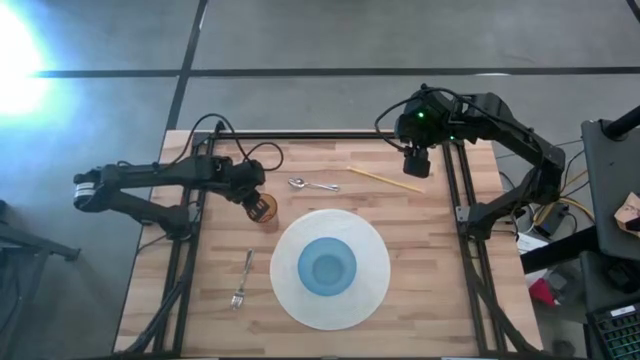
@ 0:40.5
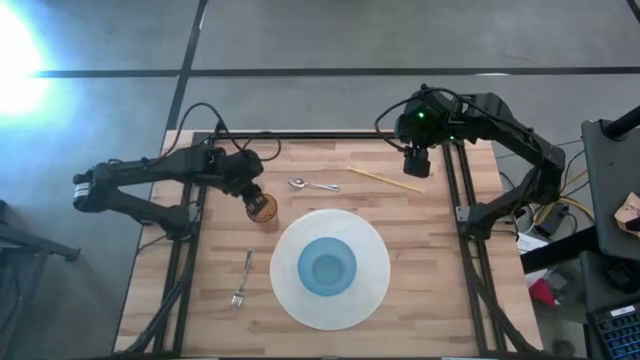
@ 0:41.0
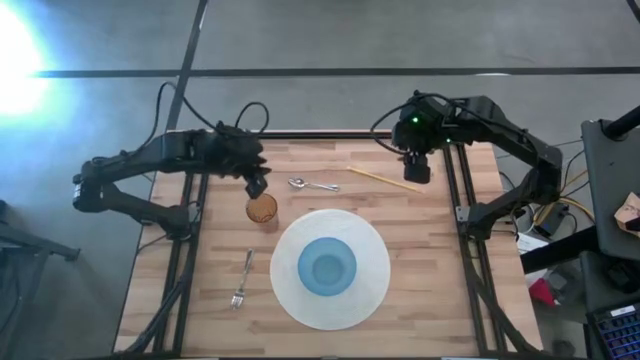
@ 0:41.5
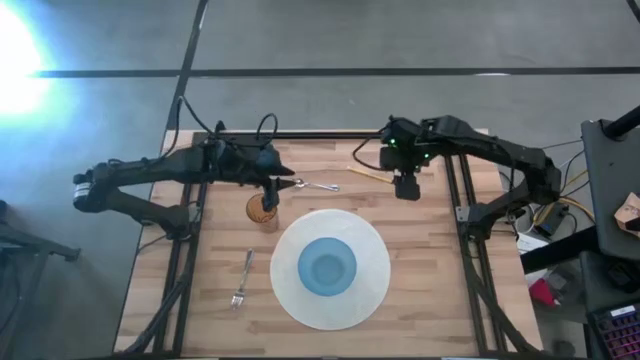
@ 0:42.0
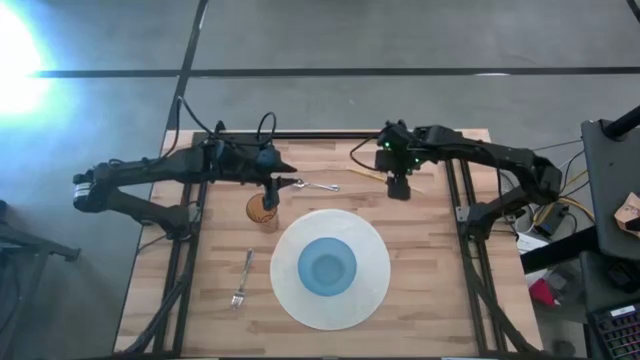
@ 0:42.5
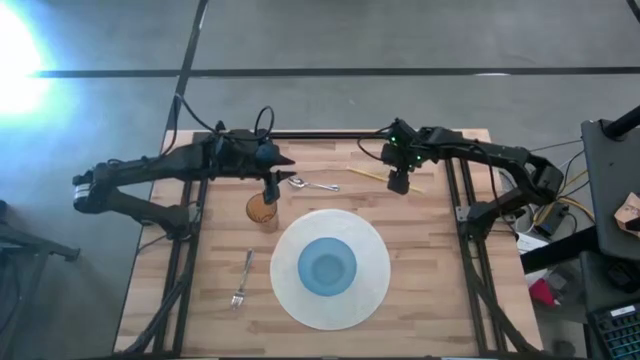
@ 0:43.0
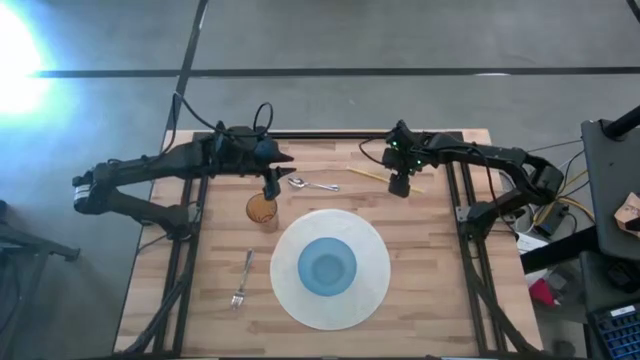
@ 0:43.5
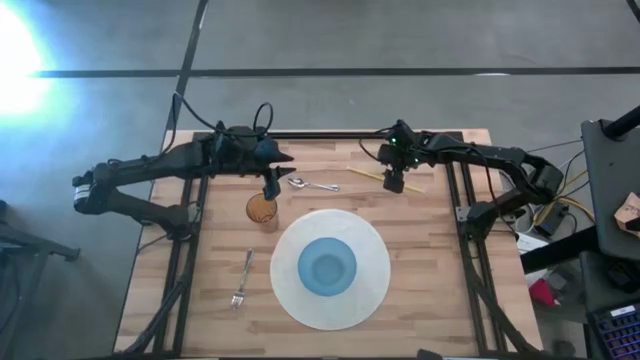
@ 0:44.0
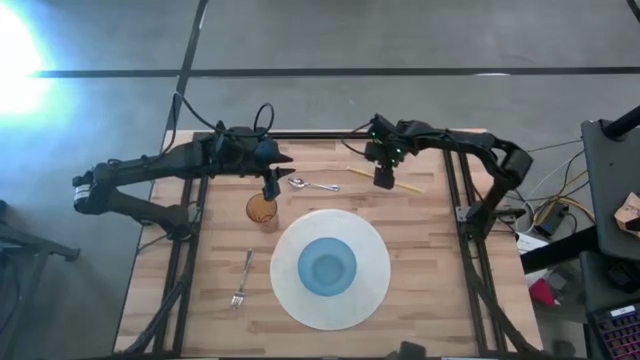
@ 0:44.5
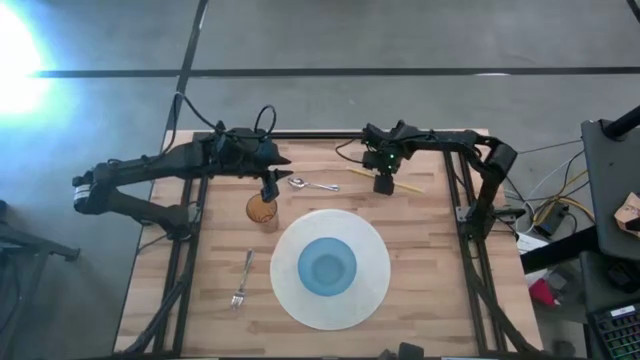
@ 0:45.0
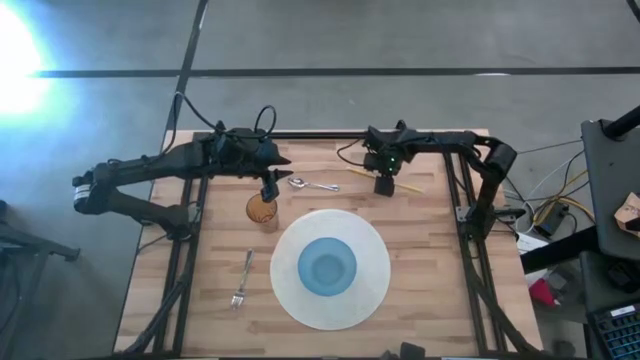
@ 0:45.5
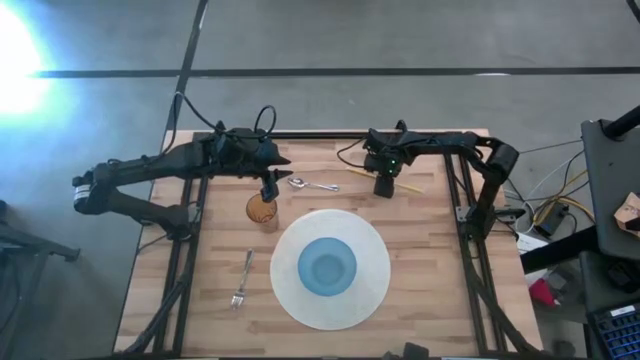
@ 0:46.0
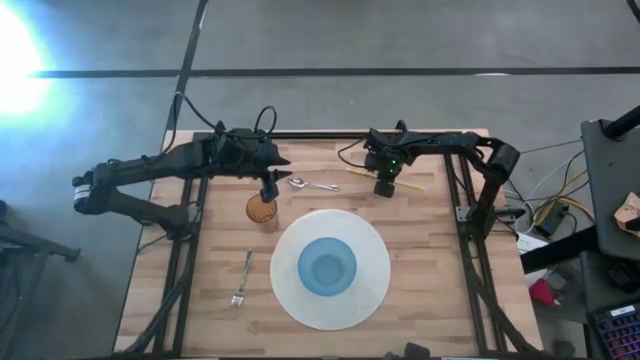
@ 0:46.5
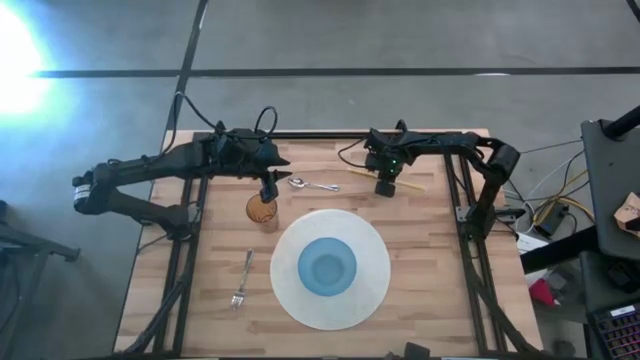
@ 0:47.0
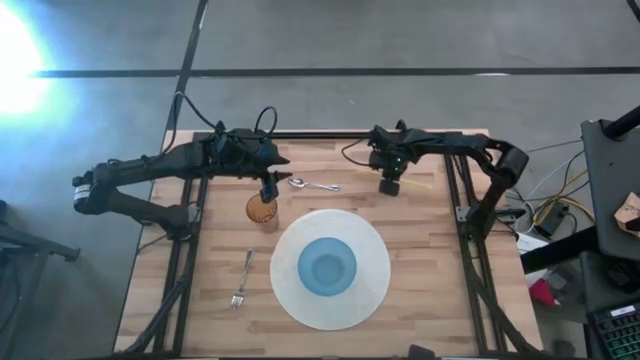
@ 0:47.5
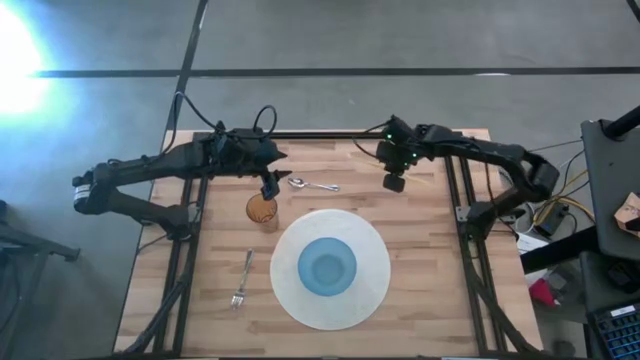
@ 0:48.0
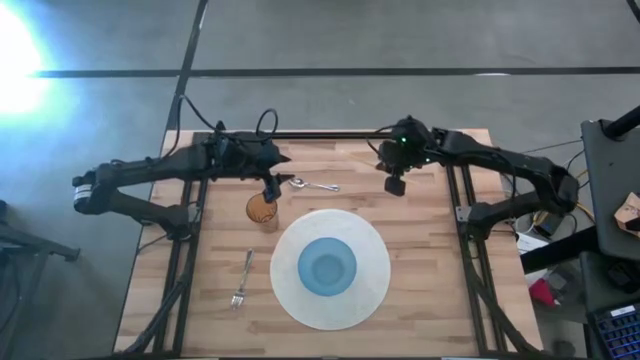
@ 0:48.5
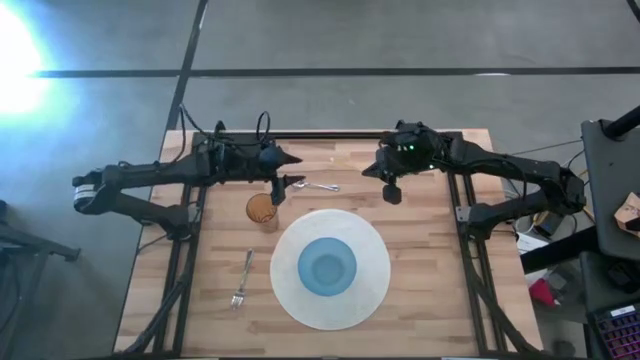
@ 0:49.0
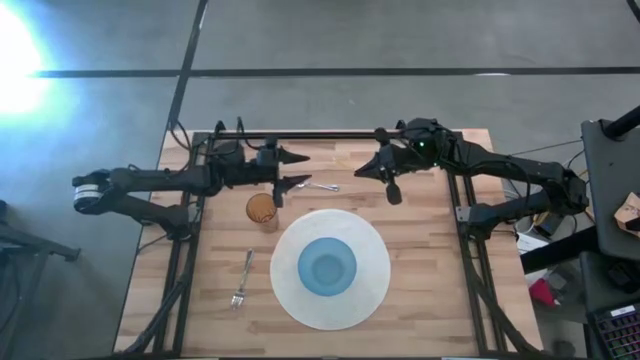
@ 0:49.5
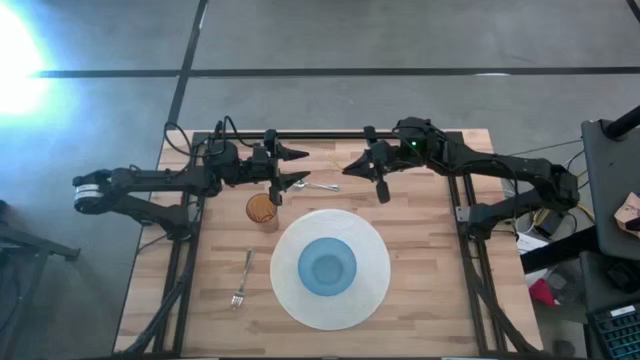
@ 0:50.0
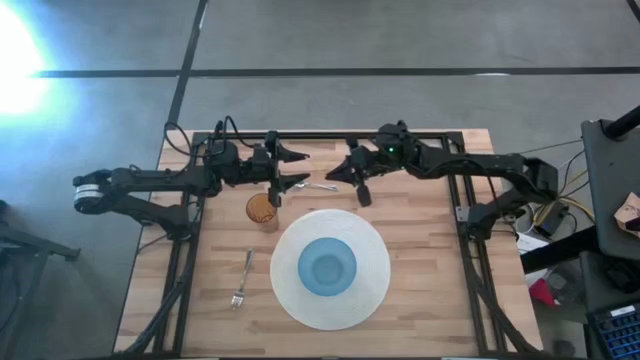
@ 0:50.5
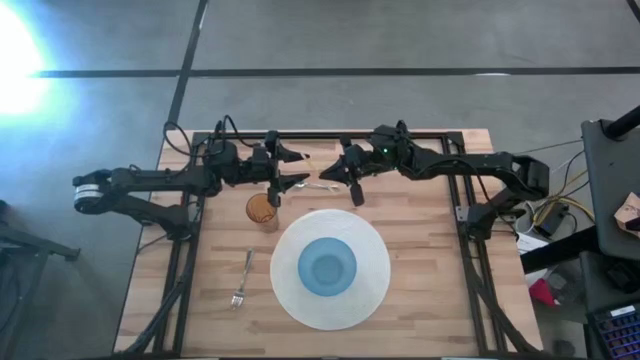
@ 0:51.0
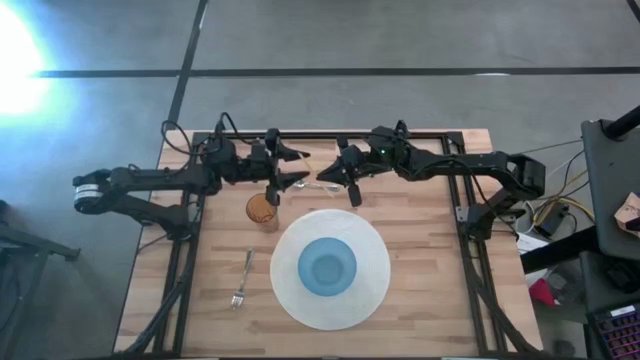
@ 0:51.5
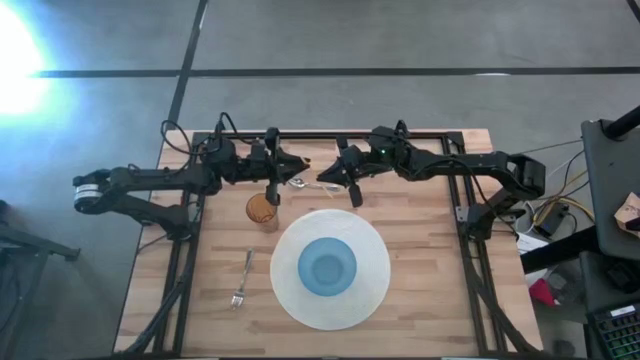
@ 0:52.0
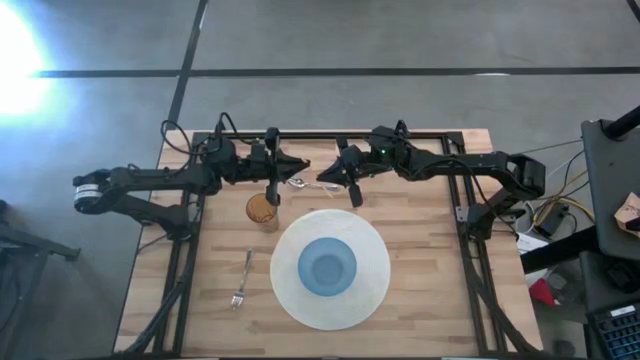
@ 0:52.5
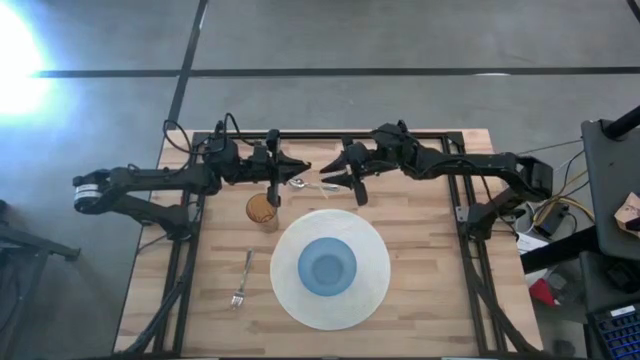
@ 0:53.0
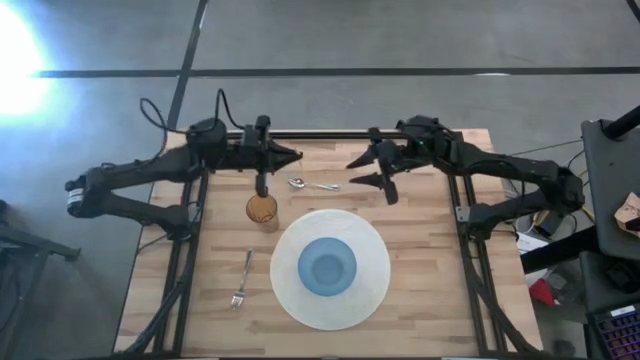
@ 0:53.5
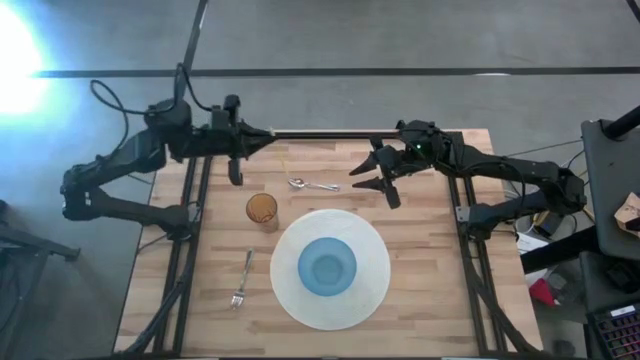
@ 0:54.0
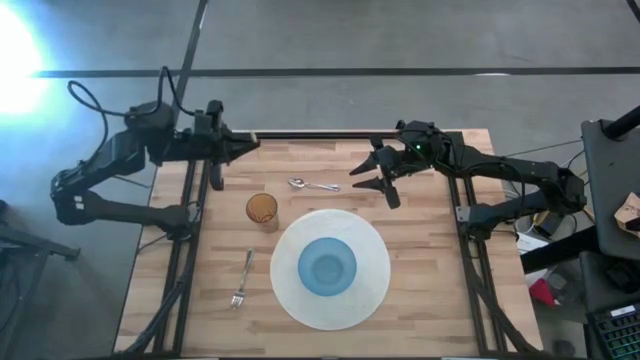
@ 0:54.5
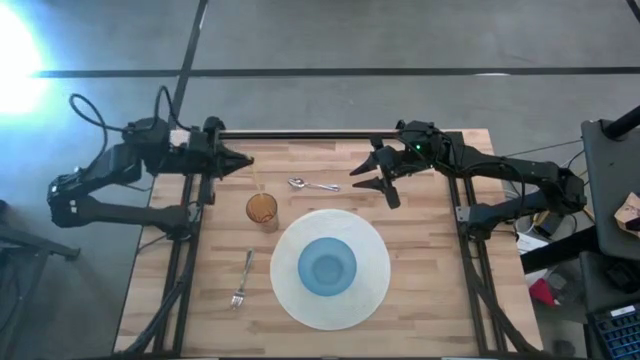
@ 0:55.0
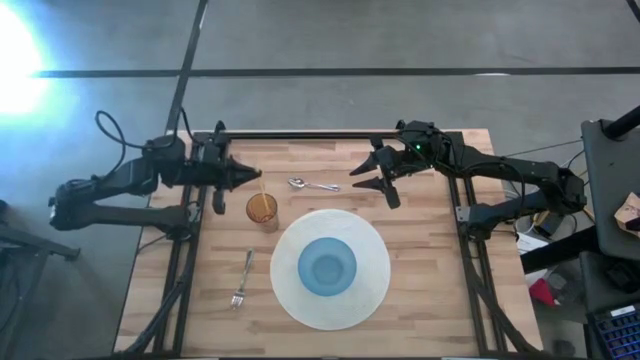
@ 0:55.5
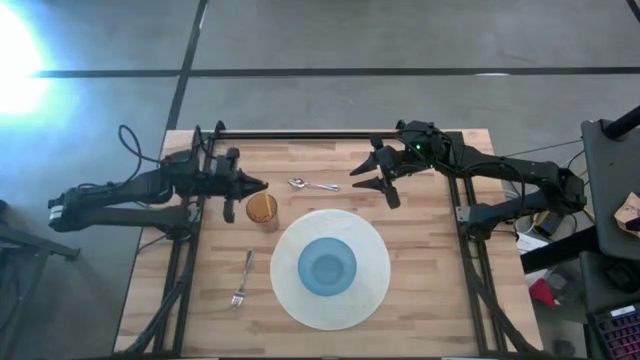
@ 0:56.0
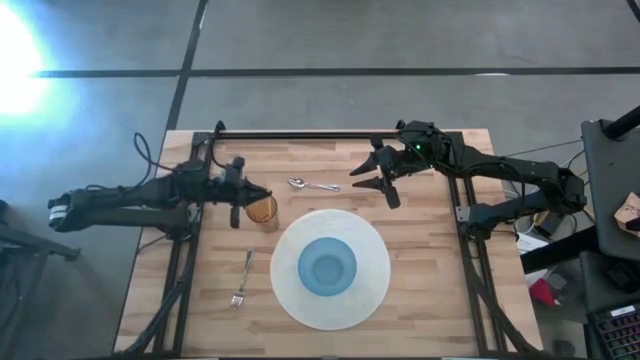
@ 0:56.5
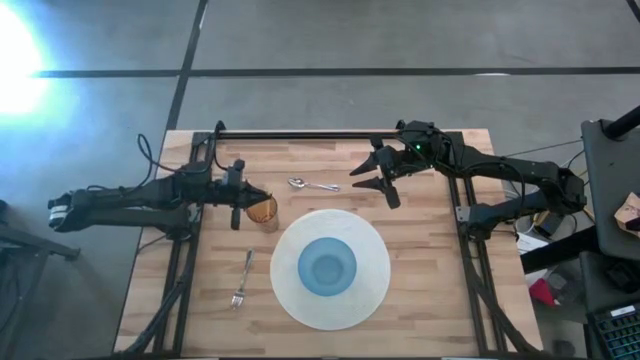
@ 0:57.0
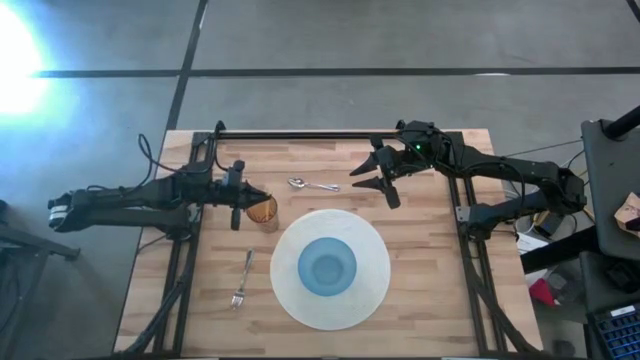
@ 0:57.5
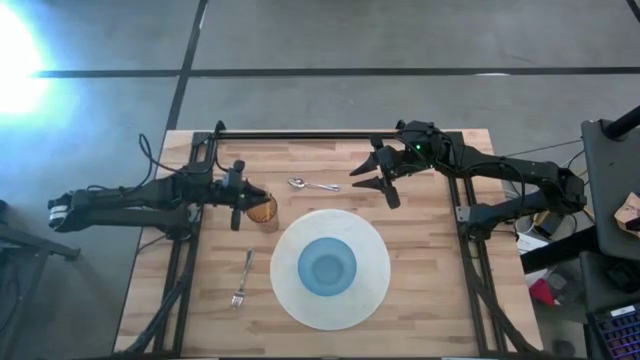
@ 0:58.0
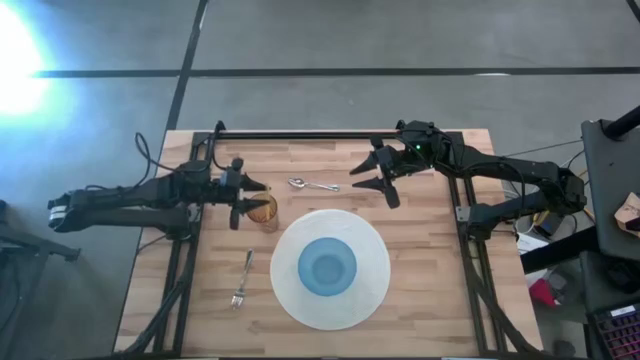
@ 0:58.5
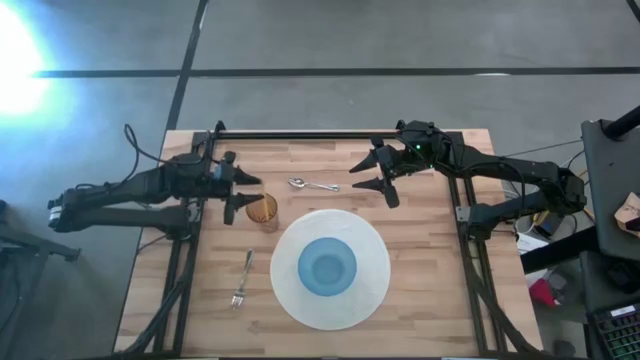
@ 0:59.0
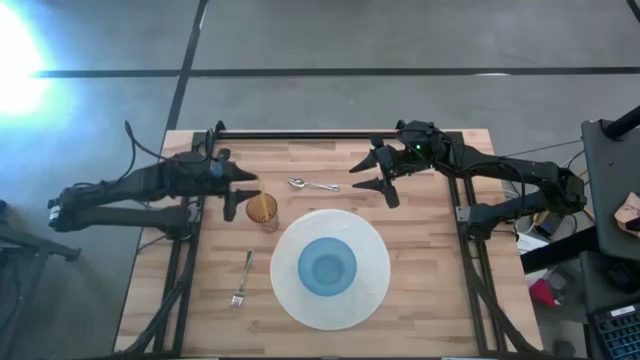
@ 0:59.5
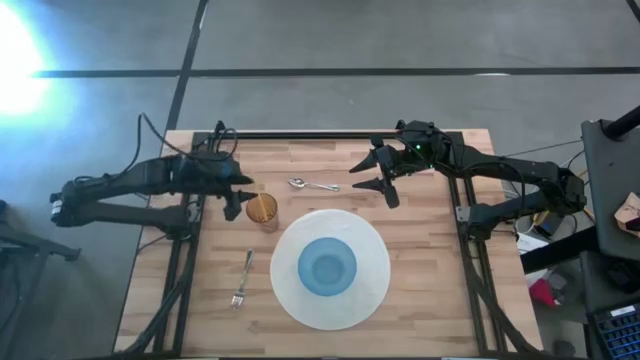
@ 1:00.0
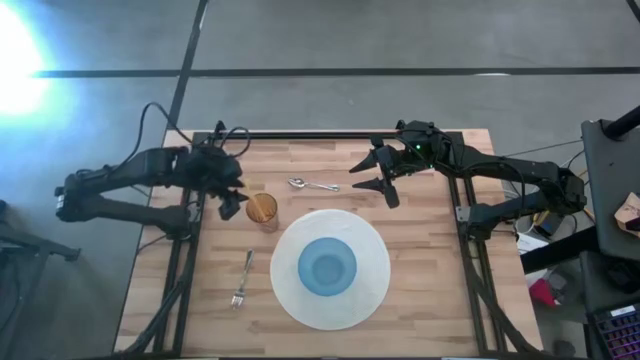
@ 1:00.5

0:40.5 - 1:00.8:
Task: Pick & Place Utensil
Put the yellow straw into the yellow glass to the top right of the white mat
